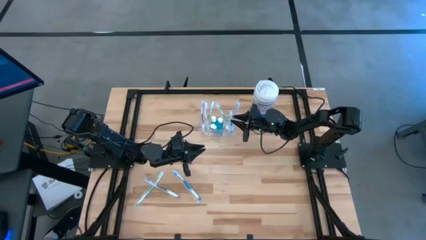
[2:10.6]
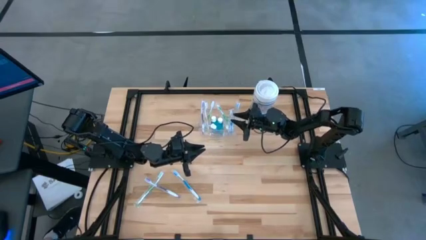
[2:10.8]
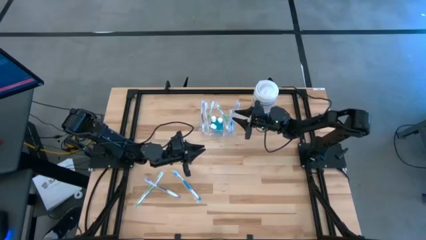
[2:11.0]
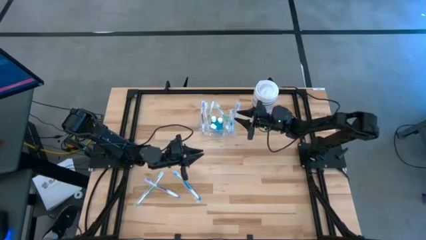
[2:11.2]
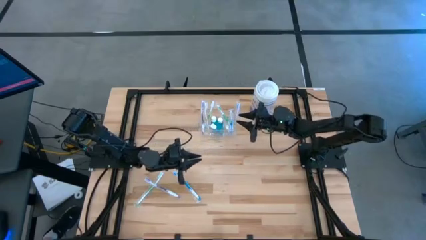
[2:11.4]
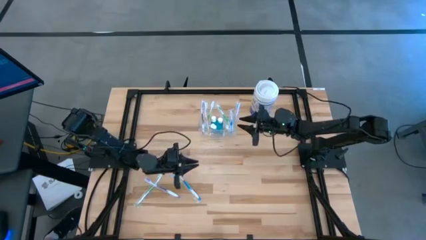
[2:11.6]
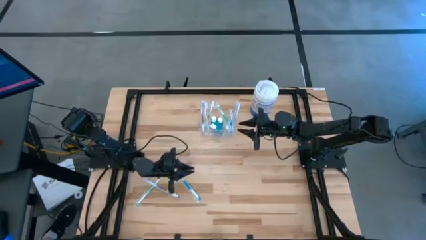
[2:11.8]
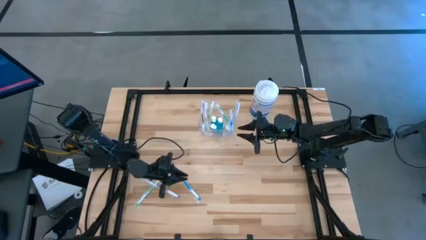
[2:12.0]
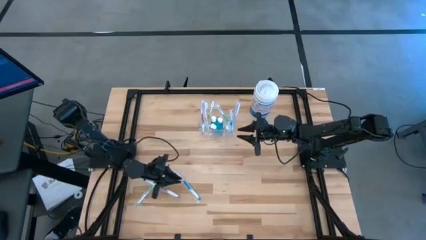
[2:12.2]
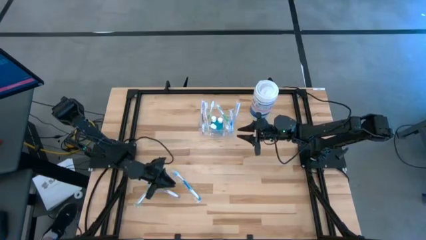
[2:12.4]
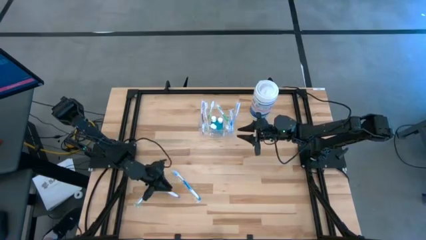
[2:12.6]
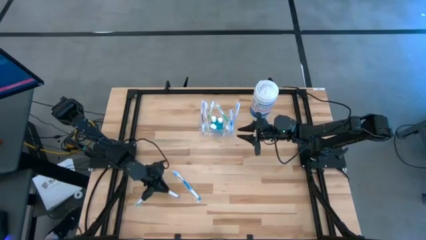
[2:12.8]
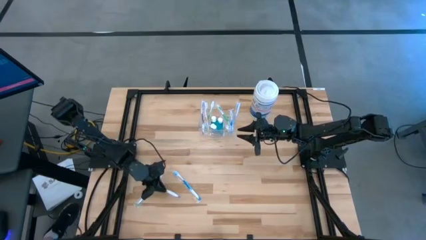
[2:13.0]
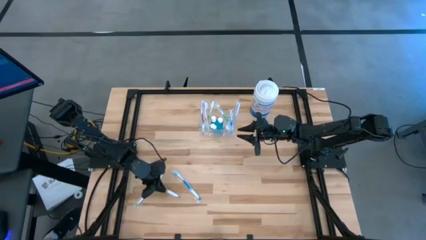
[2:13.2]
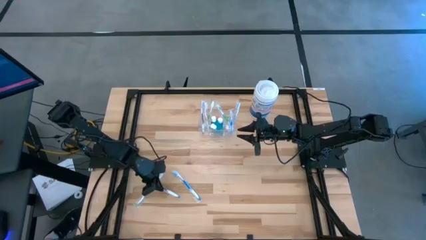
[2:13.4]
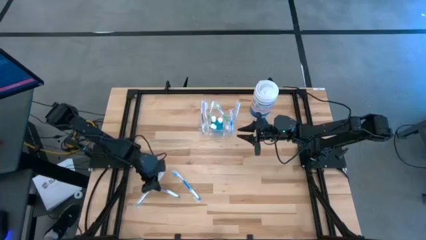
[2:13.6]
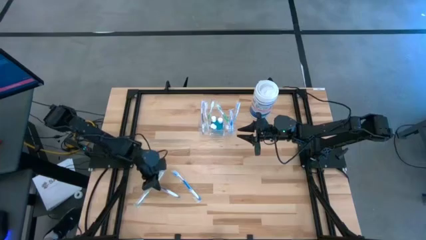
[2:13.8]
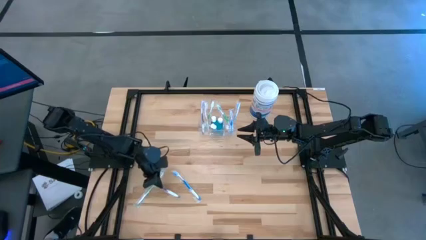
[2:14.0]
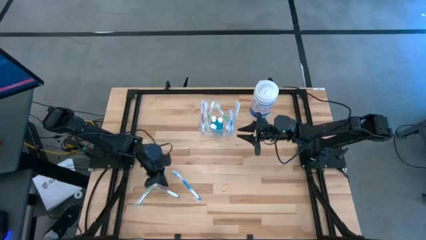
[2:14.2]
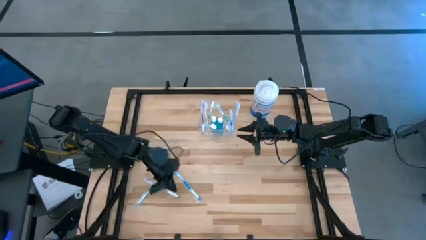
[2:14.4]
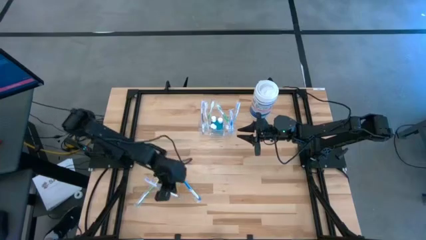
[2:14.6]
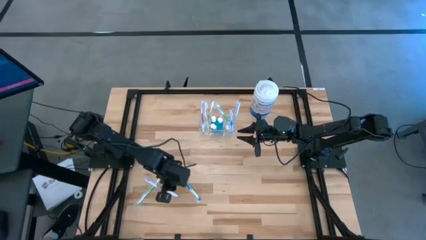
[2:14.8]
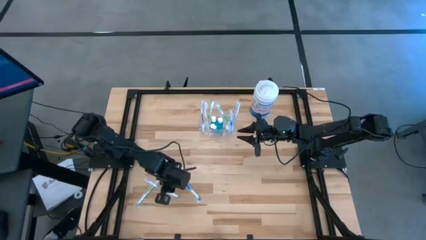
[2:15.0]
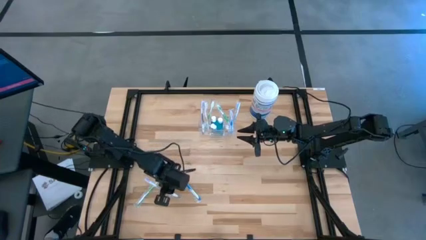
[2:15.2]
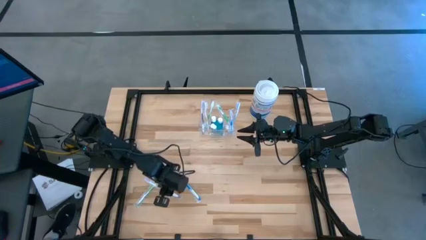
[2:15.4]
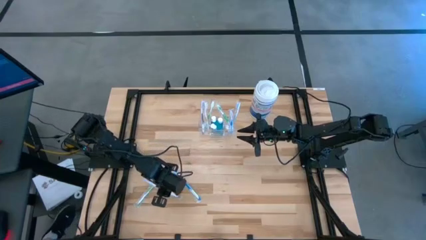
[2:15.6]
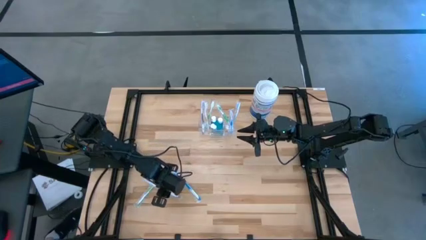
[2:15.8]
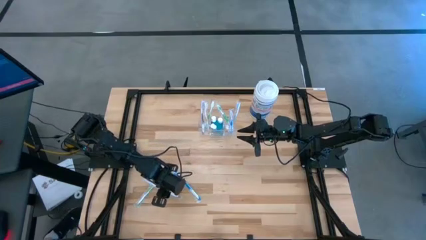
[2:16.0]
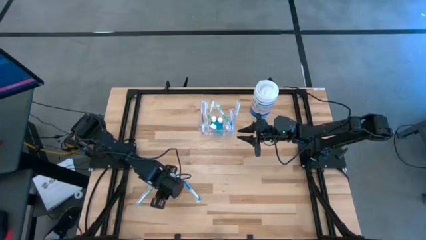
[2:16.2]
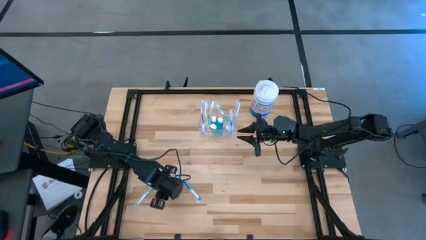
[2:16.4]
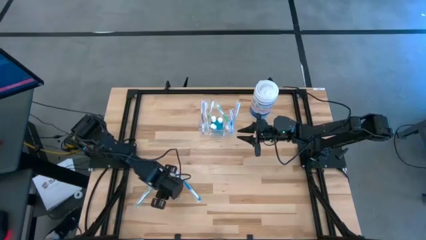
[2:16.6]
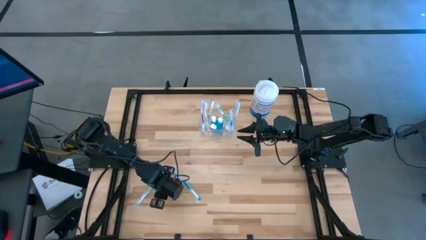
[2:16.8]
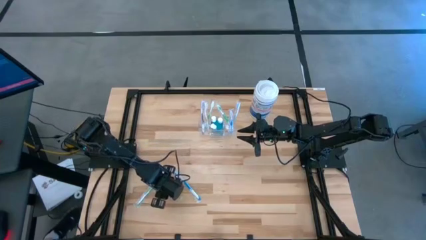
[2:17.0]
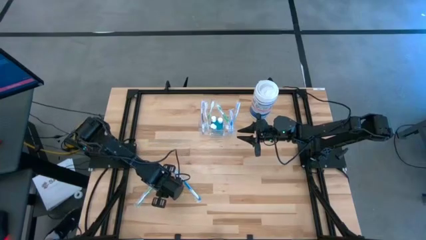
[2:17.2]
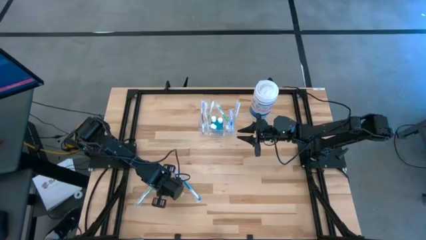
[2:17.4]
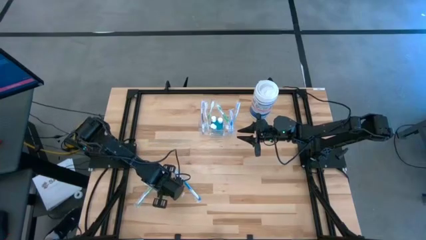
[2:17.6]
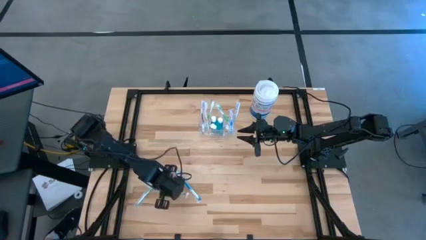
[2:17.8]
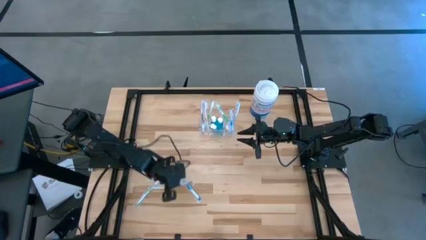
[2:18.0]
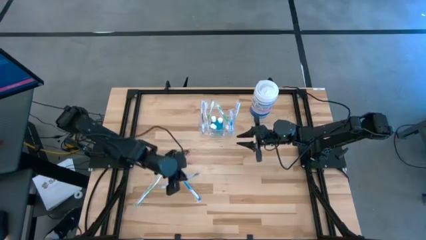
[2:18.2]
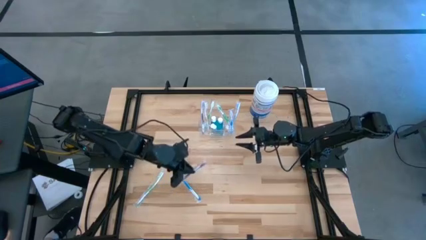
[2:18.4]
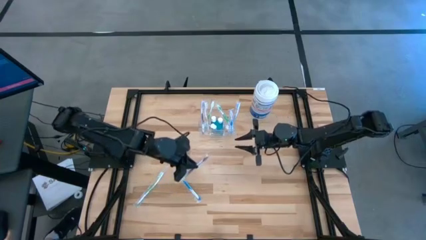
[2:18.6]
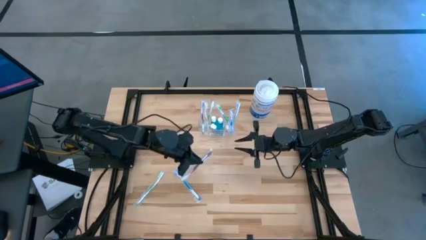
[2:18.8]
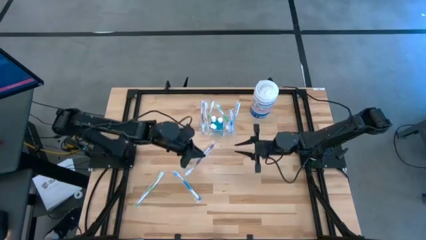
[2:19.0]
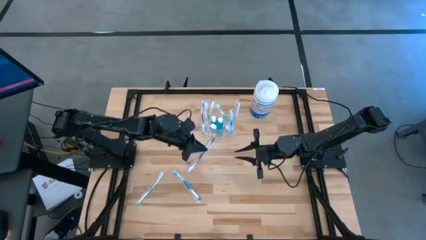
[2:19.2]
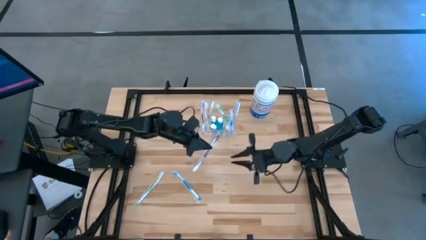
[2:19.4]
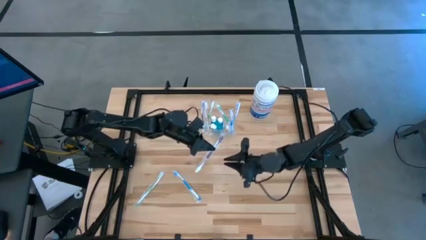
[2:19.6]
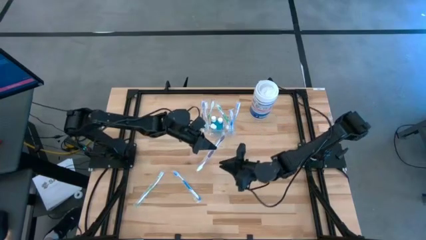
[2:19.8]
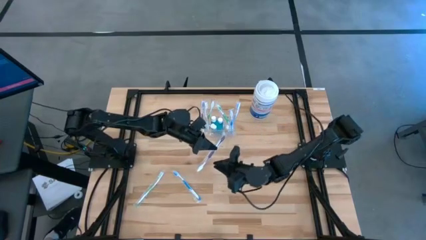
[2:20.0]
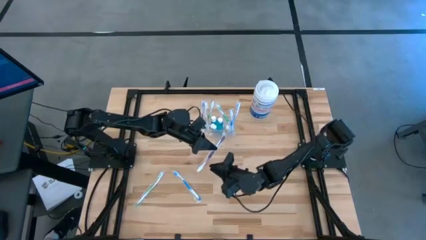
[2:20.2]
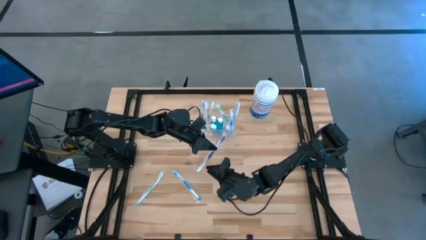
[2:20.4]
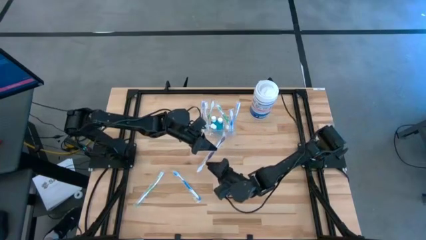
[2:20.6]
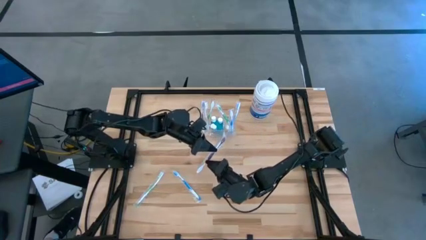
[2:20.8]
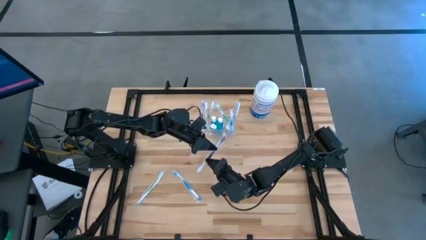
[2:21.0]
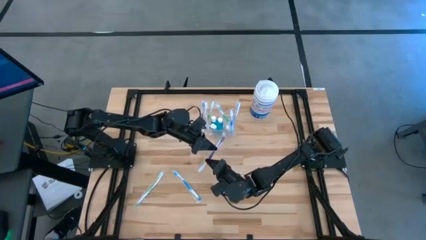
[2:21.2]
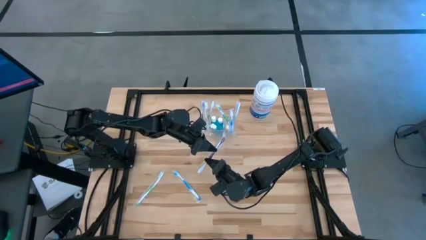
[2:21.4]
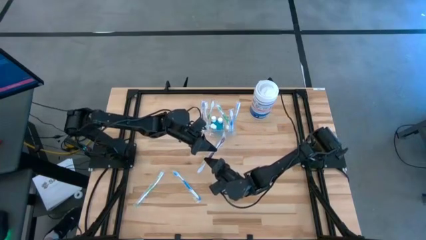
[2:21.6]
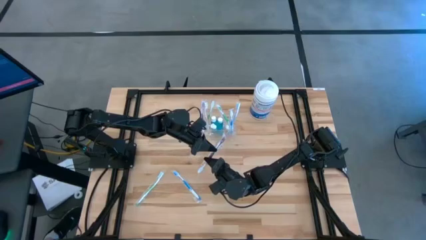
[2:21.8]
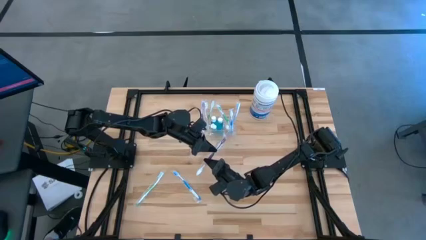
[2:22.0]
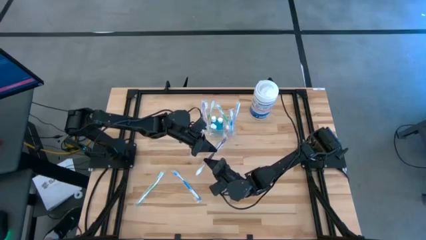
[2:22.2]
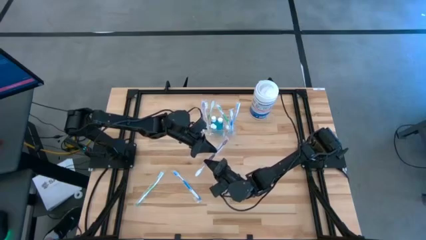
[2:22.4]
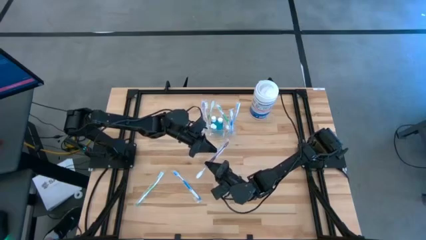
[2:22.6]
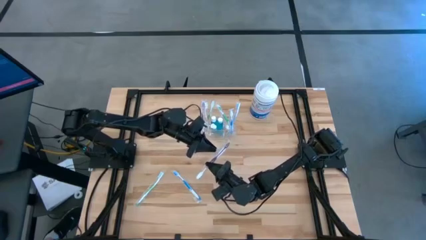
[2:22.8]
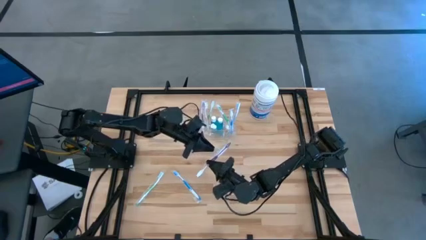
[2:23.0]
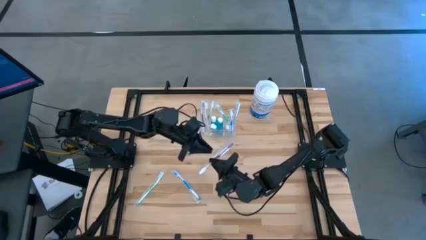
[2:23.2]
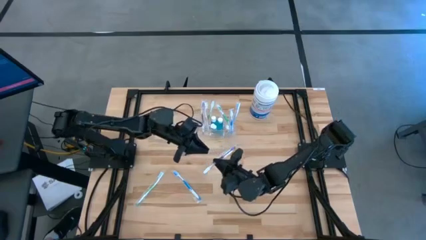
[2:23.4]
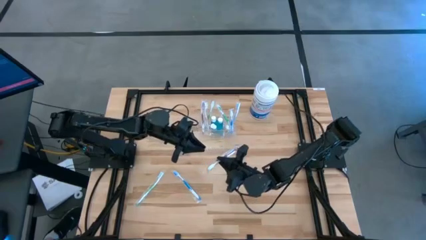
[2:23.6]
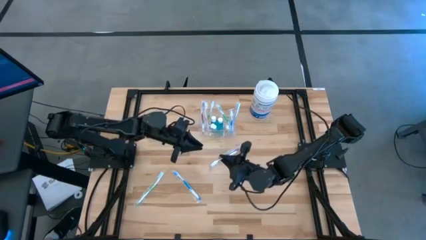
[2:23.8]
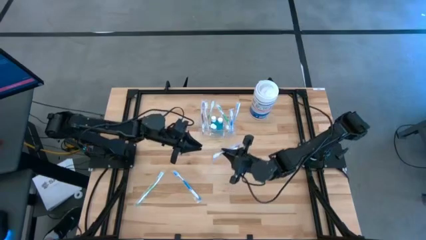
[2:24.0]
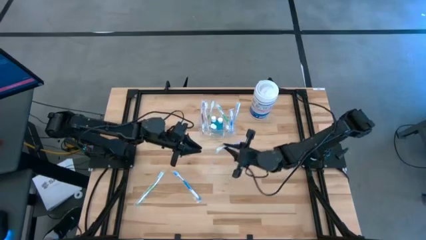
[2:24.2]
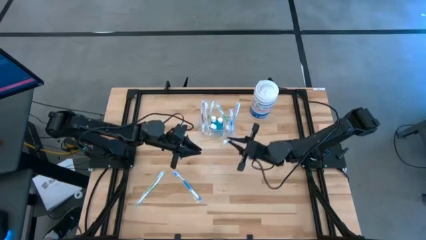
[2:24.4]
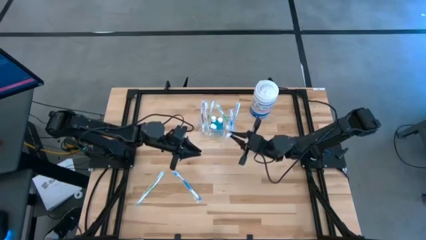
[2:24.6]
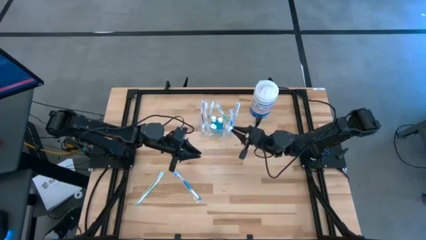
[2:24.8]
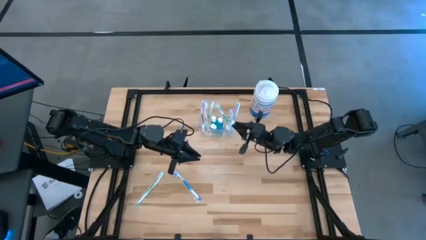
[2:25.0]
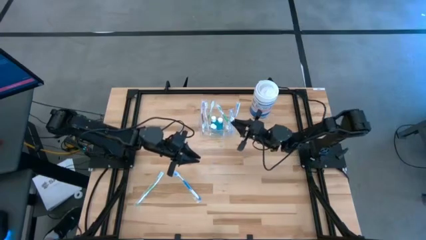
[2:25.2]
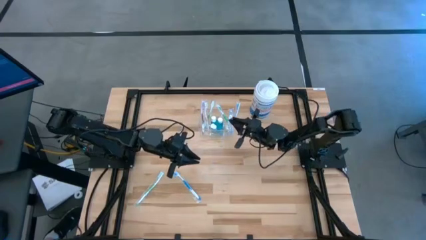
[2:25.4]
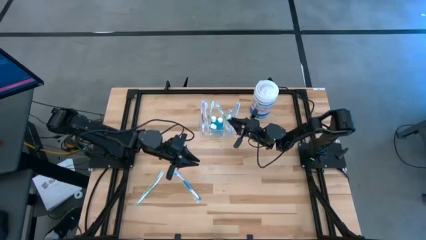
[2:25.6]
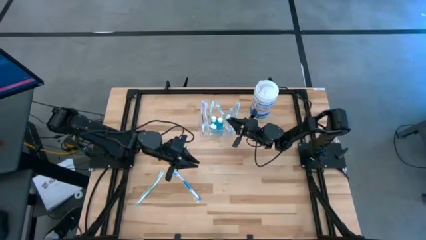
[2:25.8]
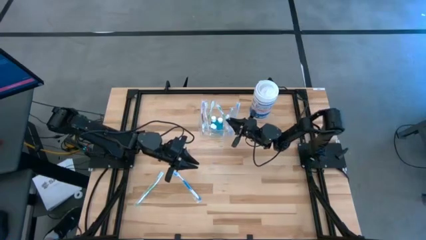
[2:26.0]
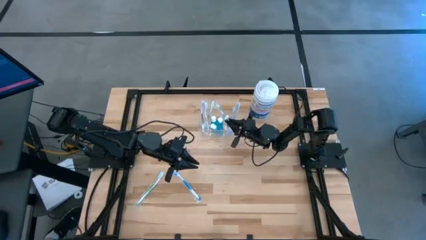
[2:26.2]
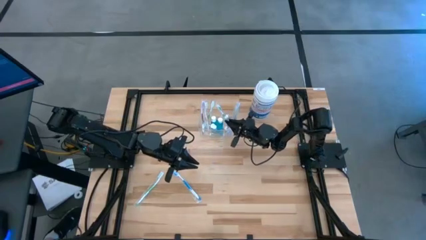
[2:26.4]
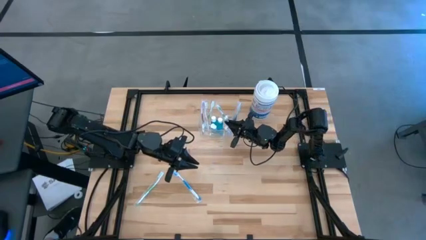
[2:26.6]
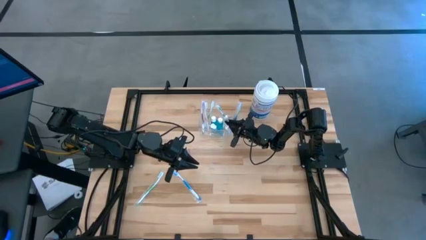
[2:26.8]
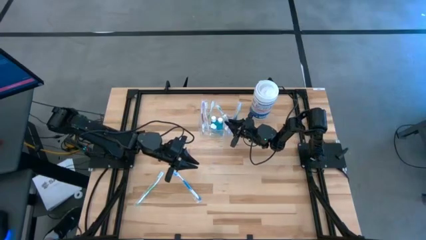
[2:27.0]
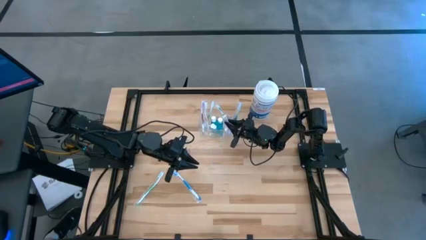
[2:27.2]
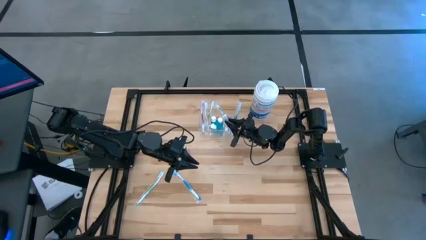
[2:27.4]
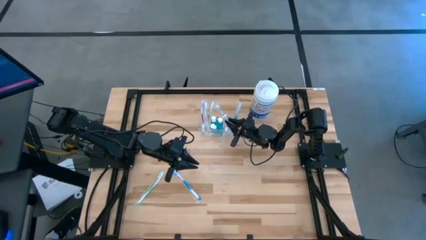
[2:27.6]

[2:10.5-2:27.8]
Task: Pick & Place toothbrushing station
Put the purple toothbrush into the transparent organizer
